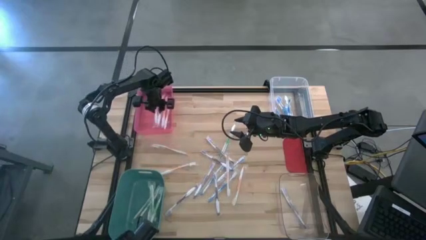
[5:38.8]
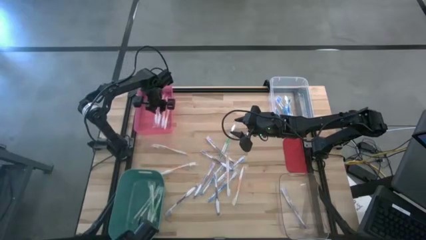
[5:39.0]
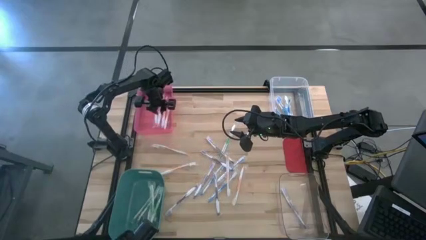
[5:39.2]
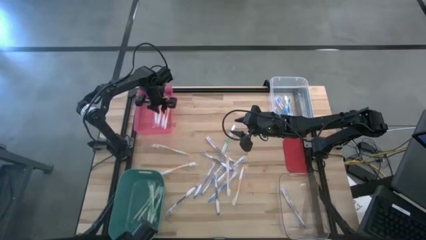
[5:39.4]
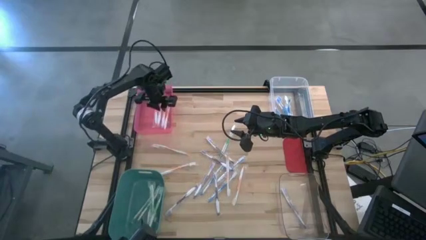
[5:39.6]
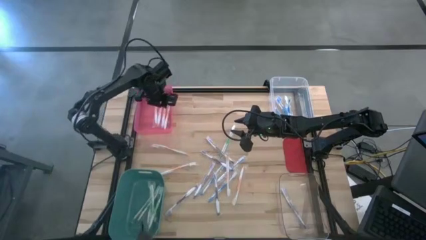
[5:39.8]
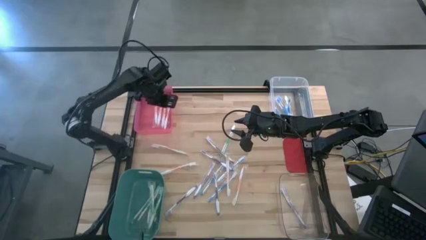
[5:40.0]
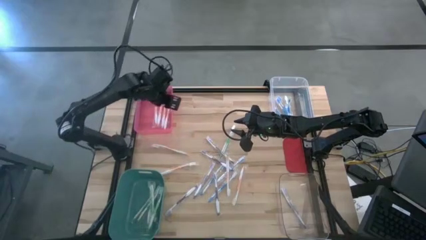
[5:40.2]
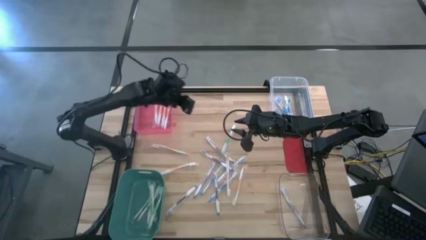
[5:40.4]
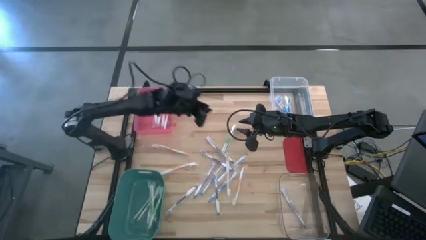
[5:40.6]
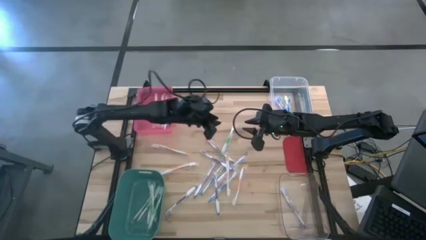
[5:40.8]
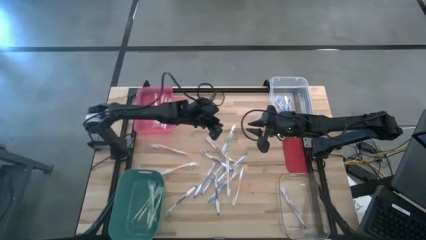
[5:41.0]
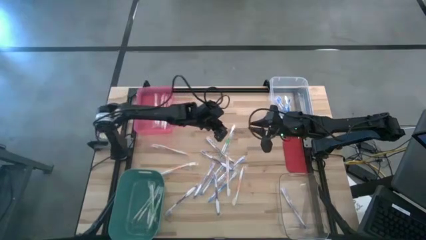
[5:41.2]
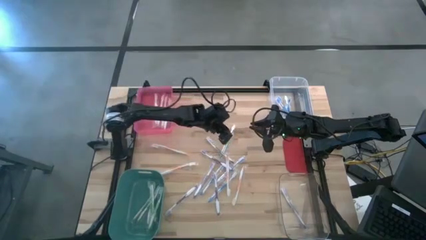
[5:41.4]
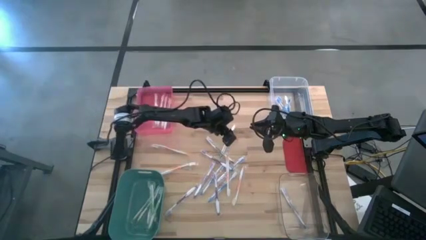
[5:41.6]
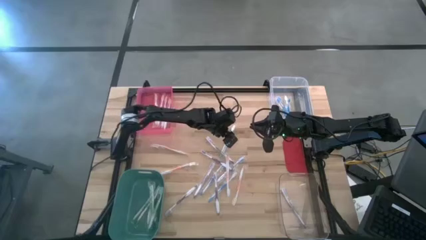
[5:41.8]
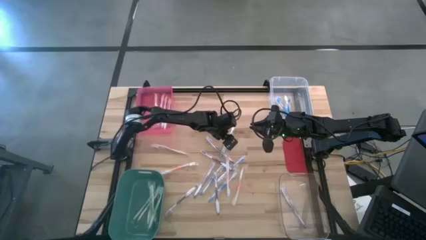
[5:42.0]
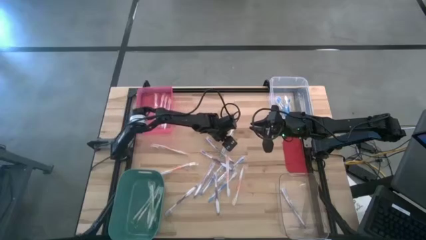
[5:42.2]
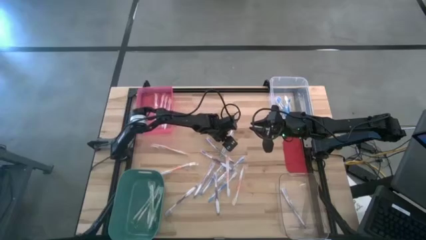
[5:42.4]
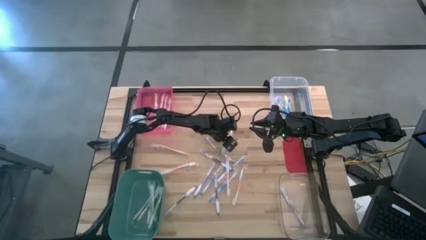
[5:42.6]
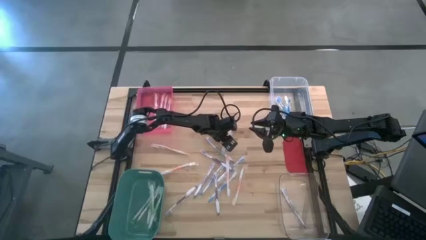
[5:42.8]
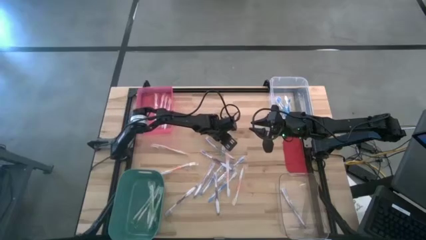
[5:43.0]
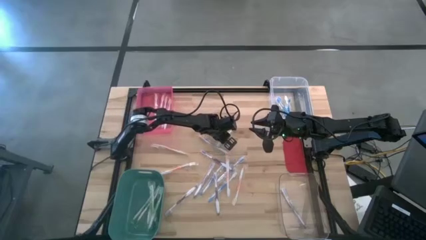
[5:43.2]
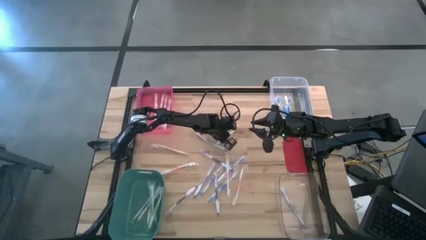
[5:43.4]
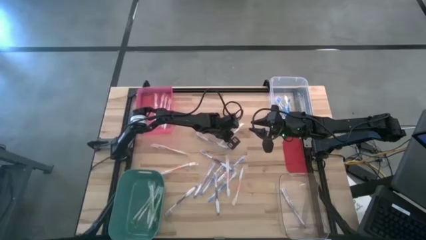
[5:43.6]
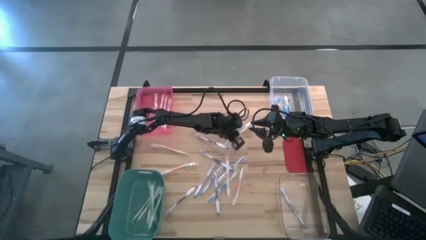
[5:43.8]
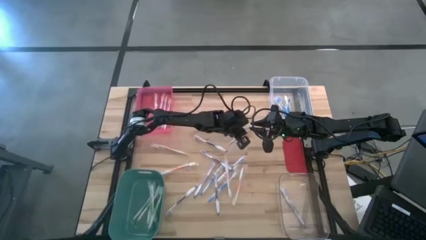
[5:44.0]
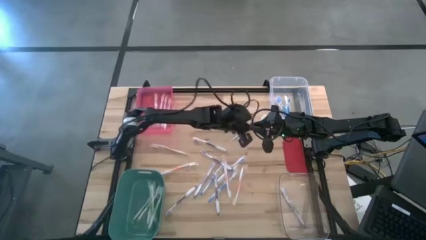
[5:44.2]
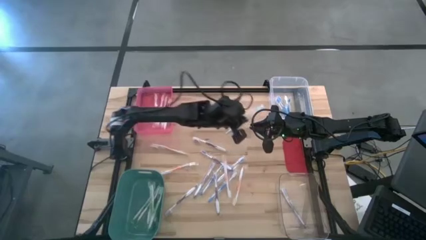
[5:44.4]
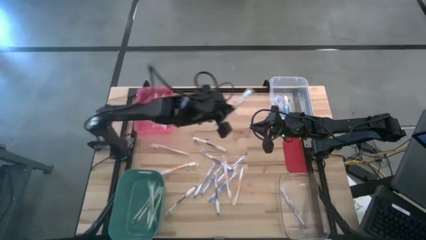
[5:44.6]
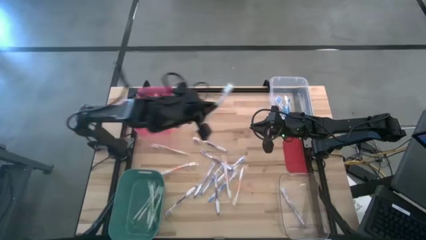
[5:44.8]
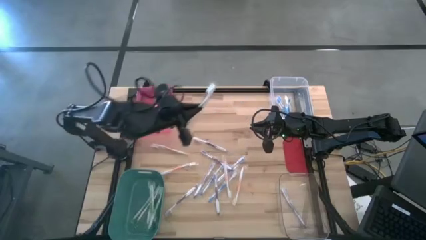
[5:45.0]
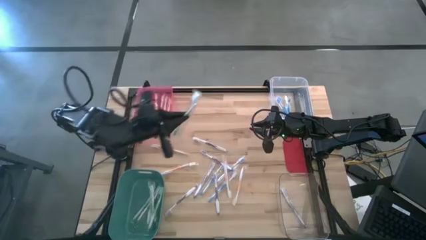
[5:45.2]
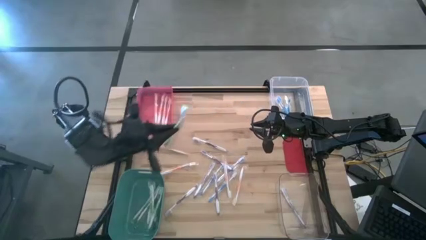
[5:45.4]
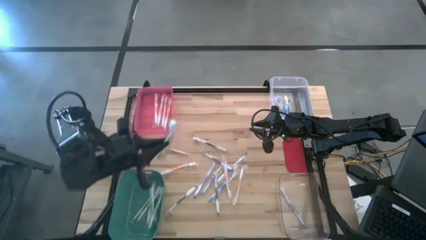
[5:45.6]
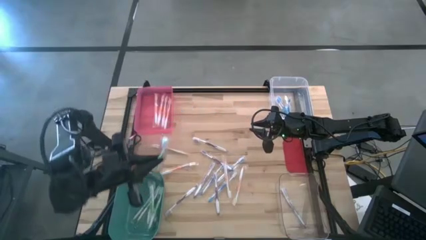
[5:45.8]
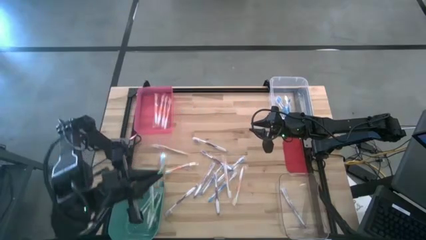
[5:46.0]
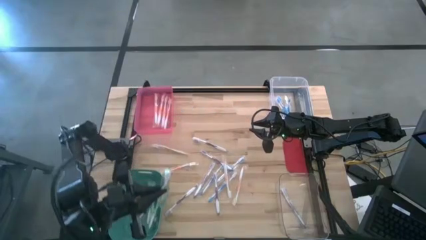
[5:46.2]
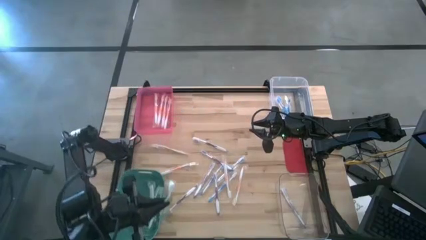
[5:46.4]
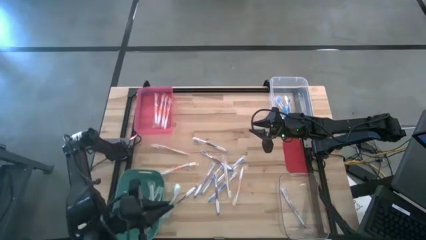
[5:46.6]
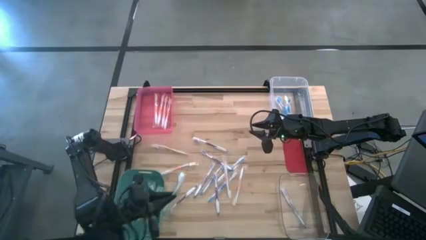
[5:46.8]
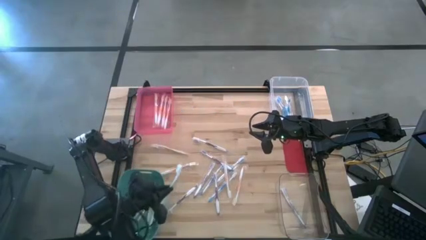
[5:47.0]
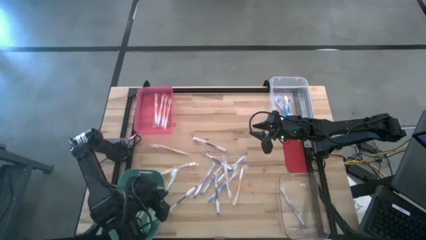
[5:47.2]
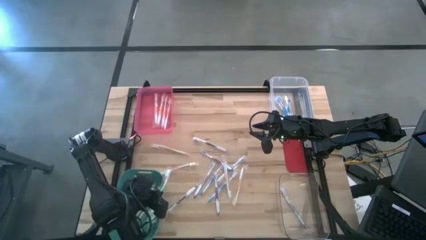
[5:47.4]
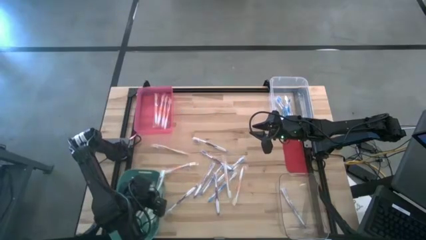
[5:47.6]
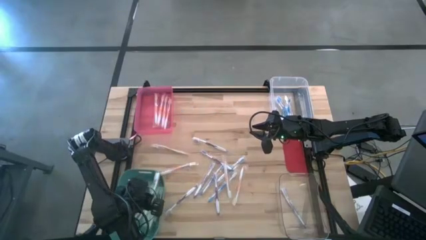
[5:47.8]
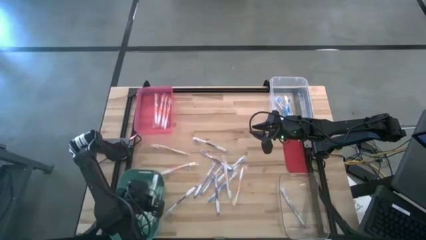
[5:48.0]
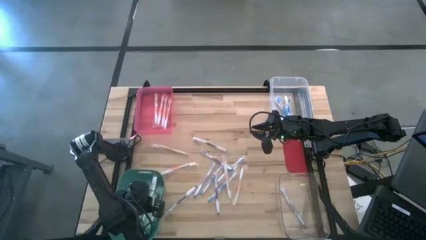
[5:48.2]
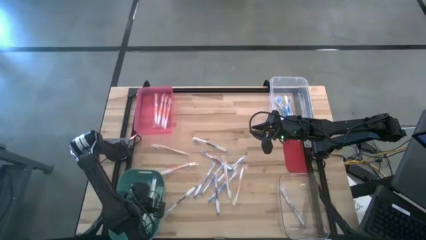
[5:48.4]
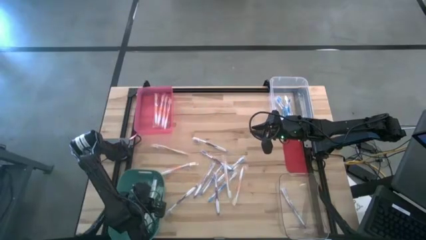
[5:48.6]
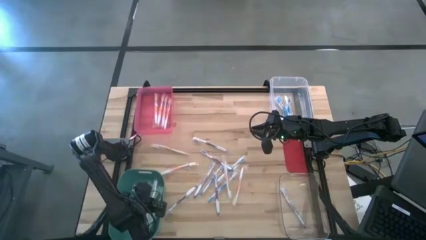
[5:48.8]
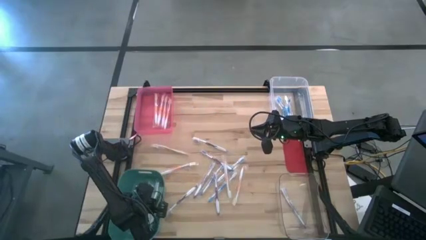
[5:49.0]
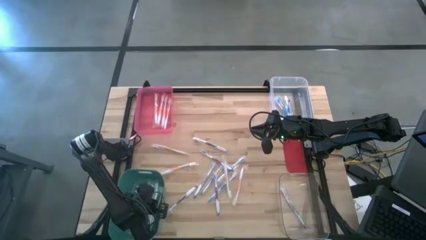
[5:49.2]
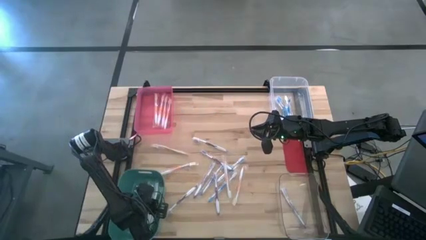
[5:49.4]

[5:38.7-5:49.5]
Task: Pick & Place Toothbrushes
Put the green toothbrush into the green bin

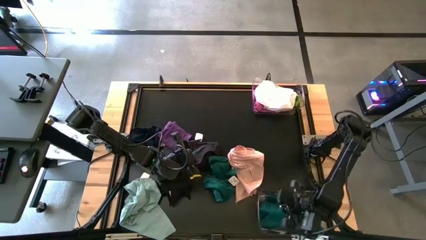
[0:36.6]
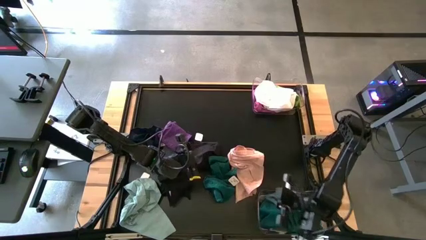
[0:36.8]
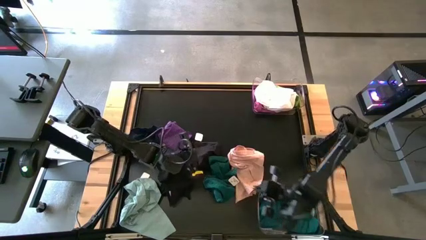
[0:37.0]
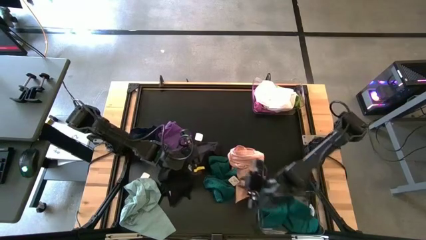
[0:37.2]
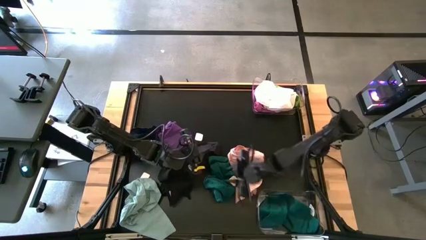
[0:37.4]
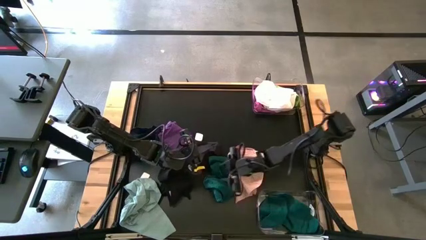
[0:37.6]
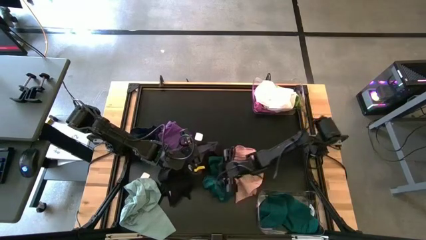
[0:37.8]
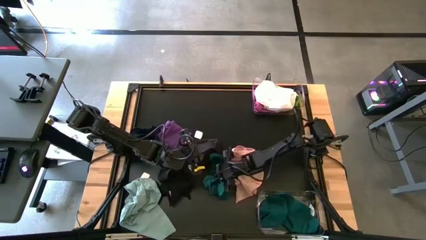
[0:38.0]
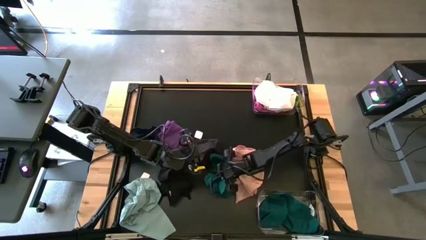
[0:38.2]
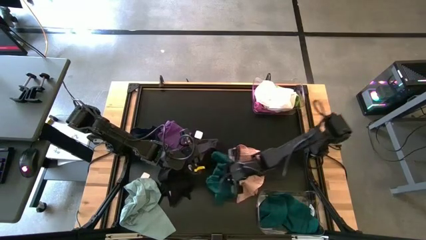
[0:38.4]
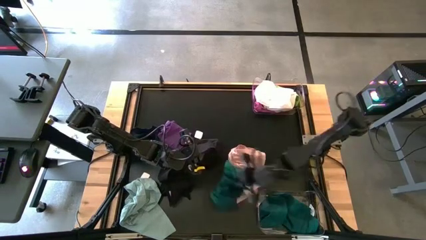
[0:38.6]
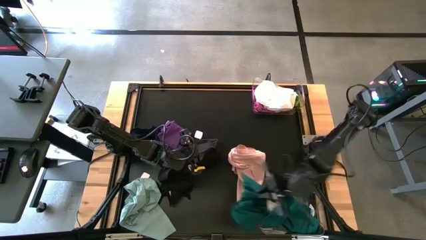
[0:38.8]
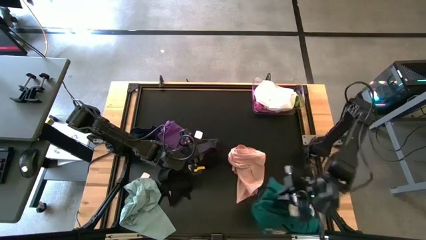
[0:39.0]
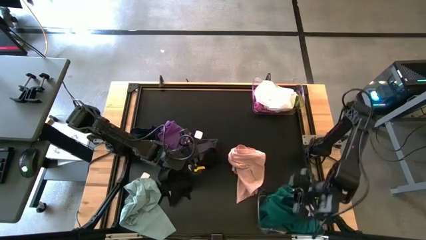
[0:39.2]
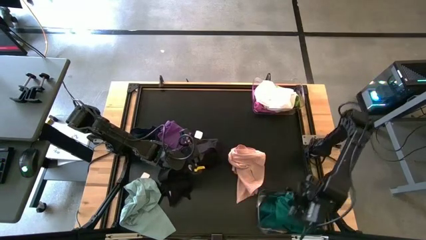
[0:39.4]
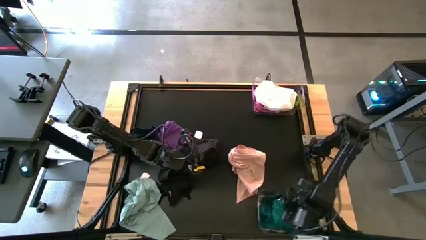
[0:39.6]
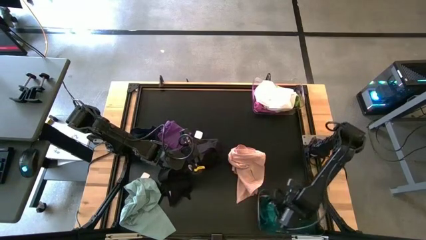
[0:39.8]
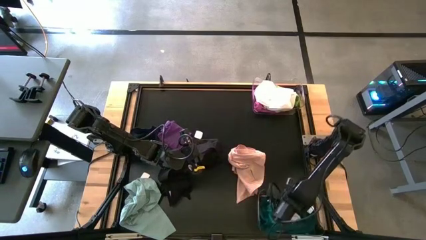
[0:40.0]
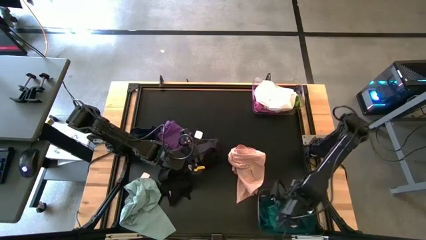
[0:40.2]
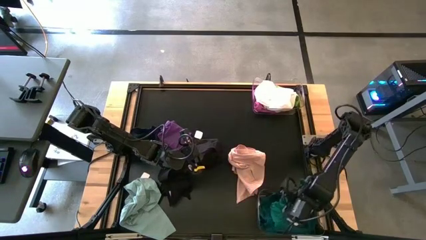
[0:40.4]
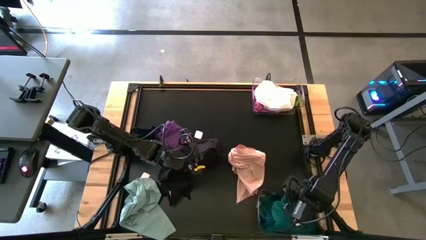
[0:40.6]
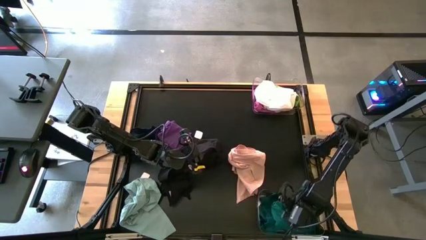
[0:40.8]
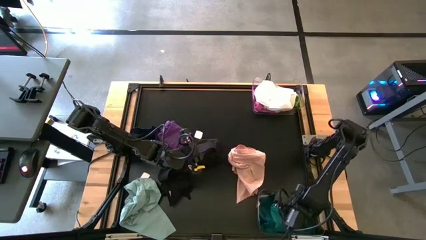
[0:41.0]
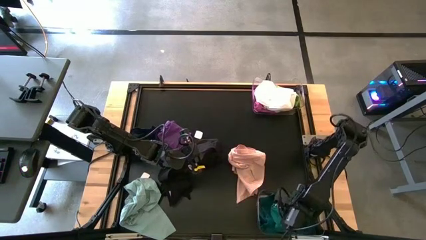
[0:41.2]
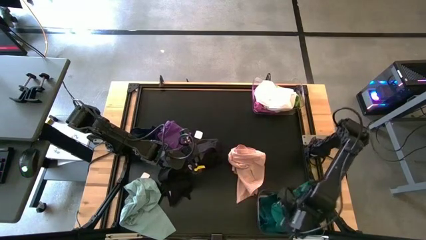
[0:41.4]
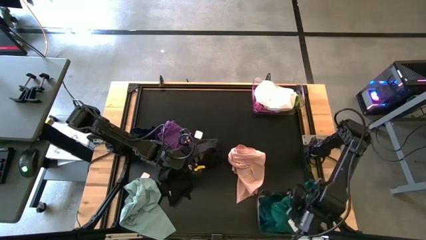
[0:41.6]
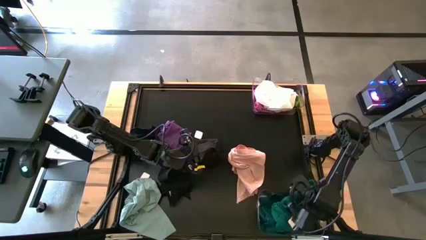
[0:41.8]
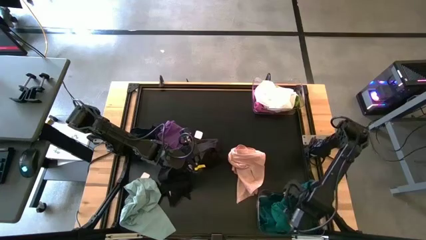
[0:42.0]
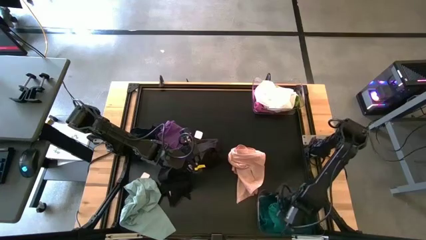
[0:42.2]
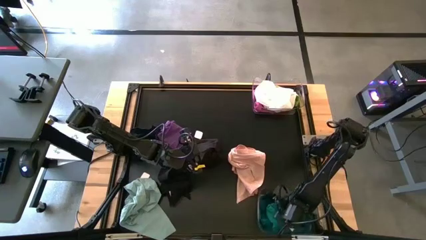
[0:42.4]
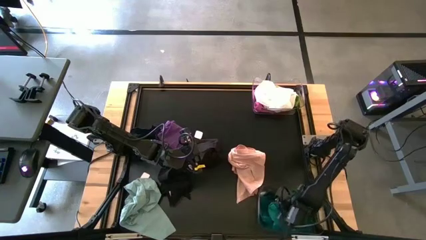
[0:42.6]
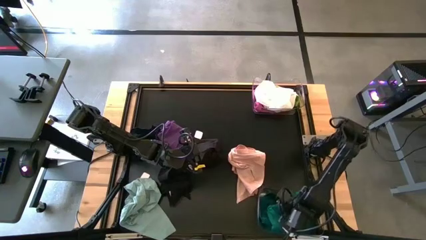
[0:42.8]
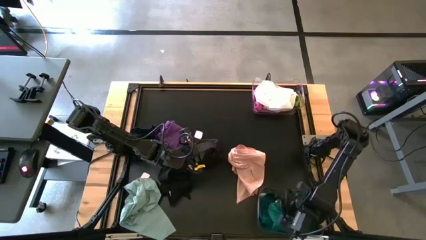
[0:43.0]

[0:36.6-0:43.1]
Task: Sort towels by color in basket
Put the dark green towel into the bottom transparent bin

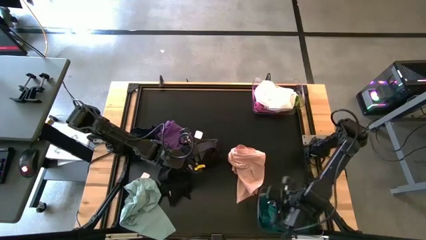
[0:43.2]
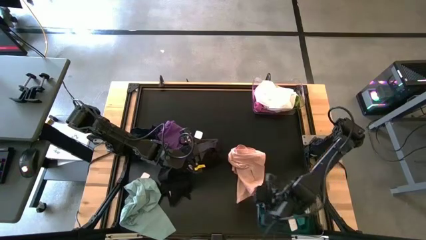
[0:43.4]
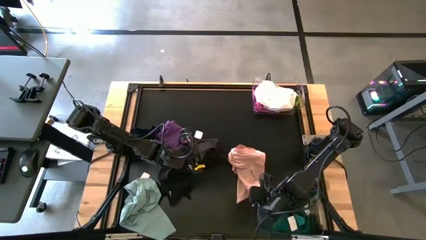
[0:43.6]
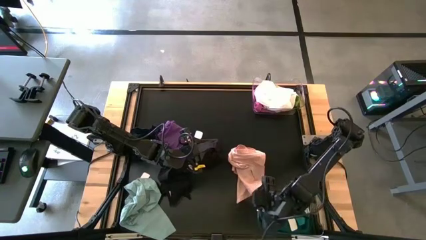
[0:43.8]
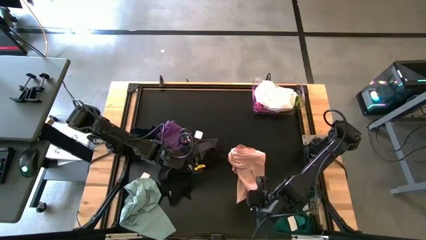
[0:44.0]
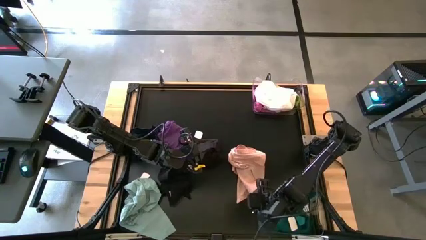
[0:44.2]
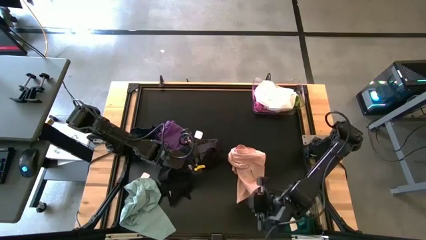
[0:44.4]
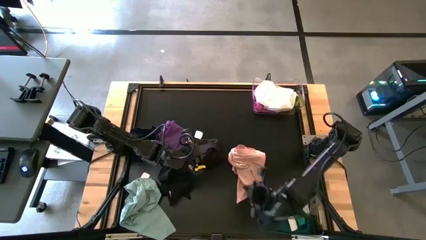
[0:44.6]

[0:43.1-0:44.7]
Adjust the bottom transparent bin
